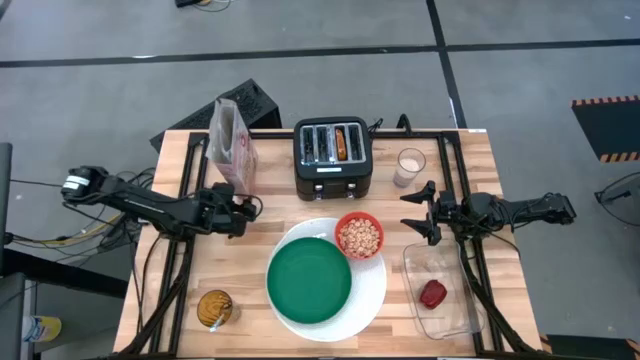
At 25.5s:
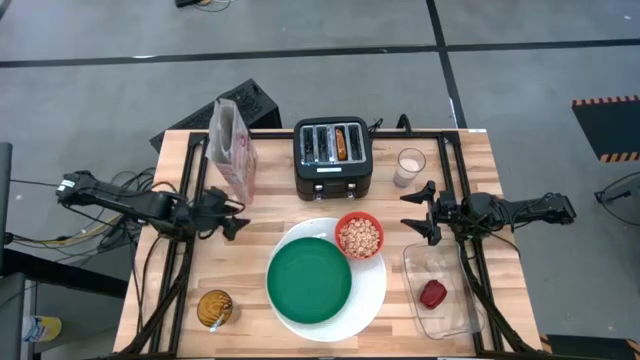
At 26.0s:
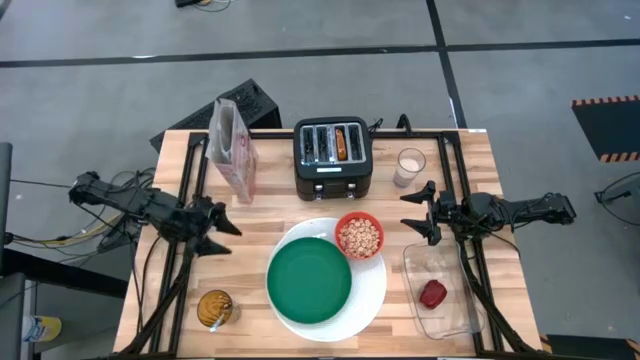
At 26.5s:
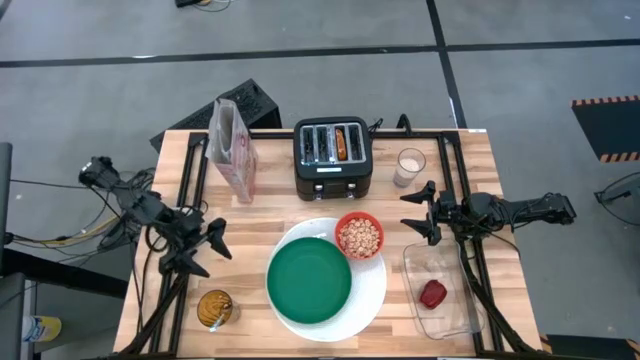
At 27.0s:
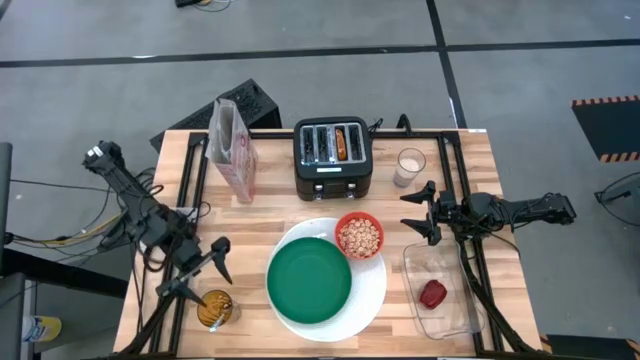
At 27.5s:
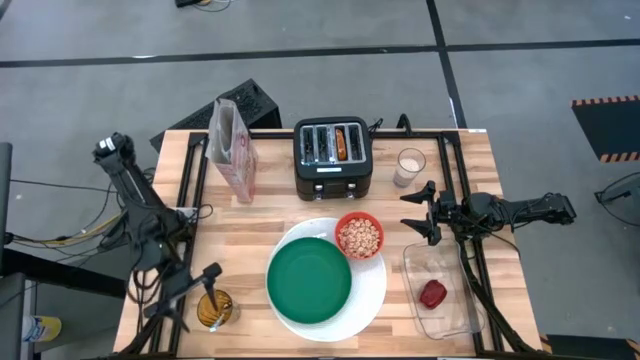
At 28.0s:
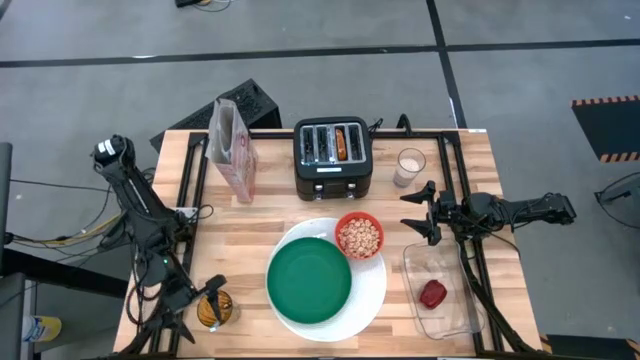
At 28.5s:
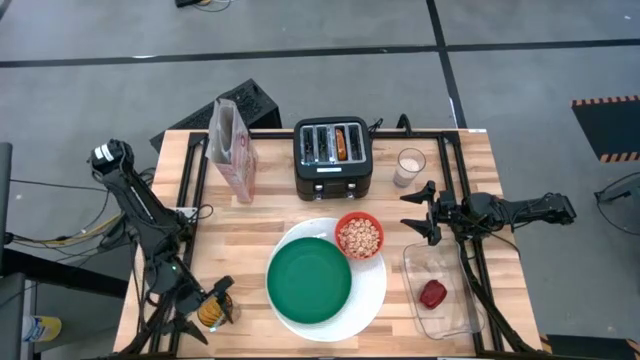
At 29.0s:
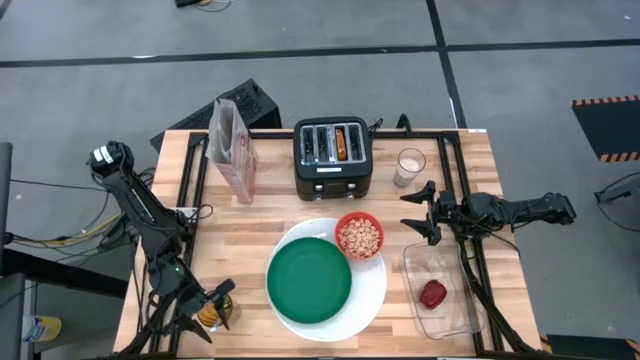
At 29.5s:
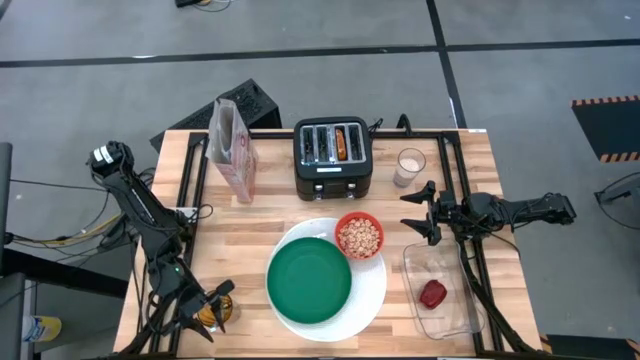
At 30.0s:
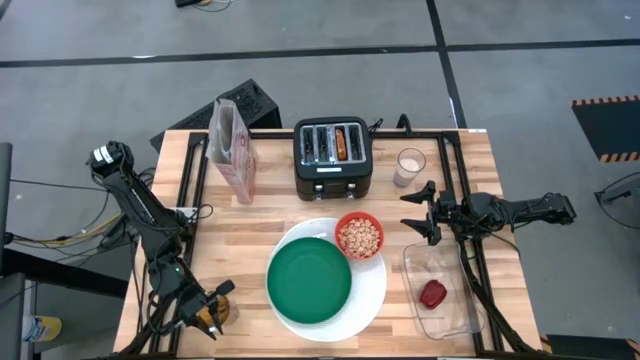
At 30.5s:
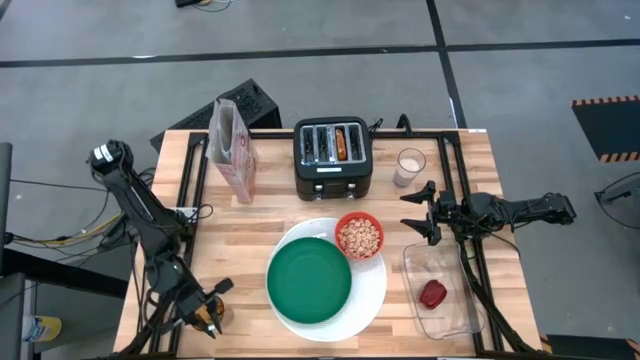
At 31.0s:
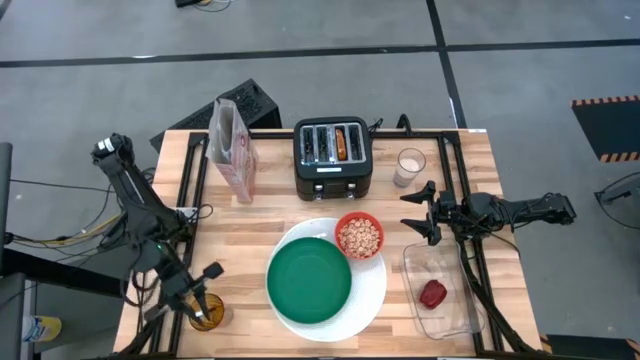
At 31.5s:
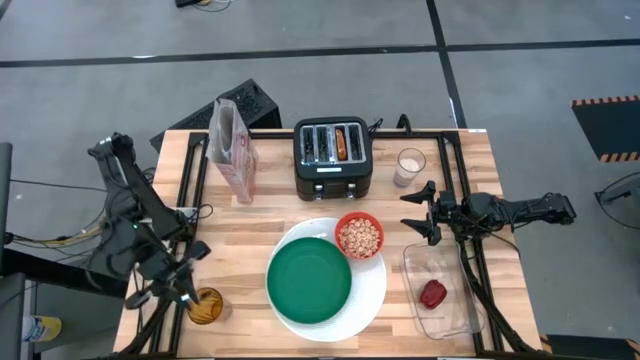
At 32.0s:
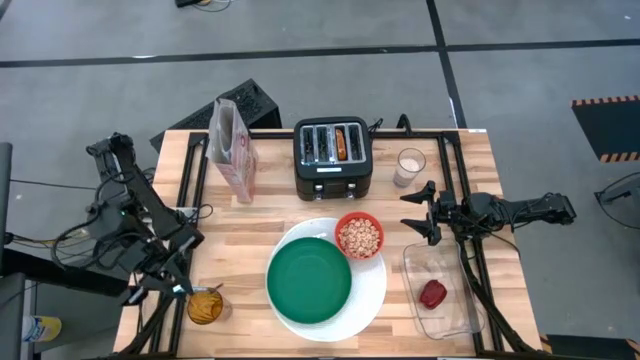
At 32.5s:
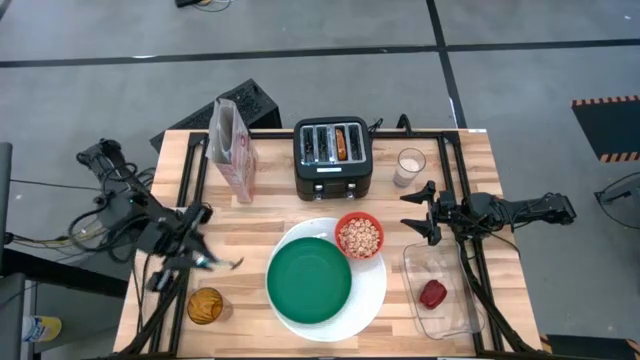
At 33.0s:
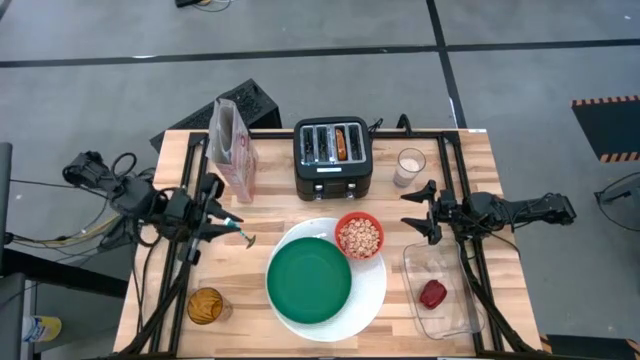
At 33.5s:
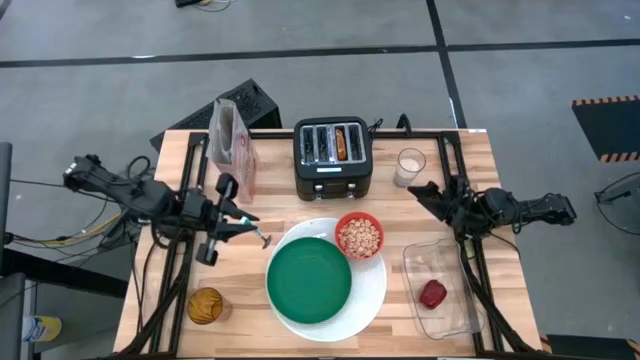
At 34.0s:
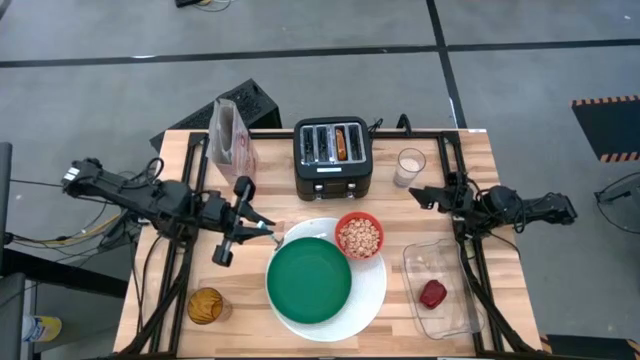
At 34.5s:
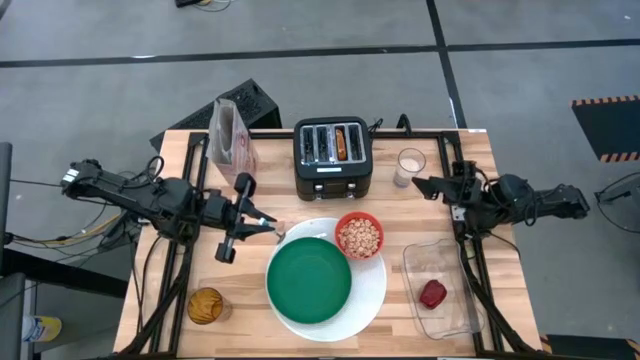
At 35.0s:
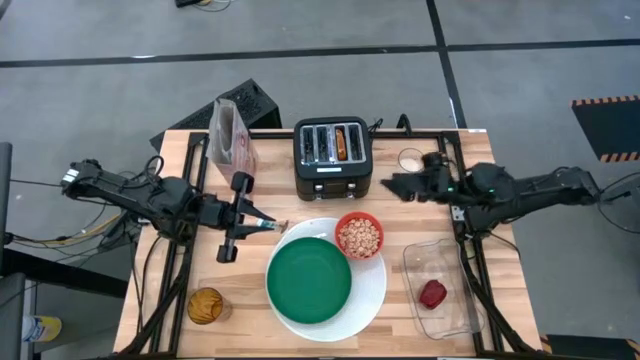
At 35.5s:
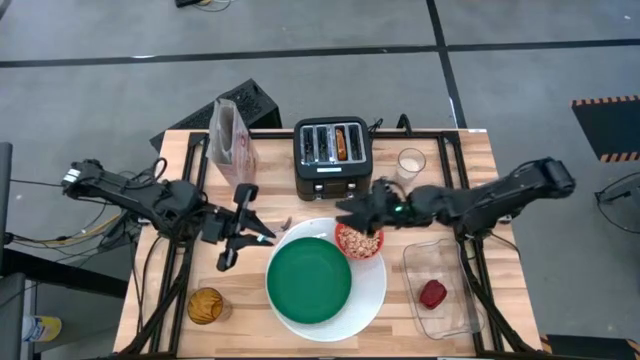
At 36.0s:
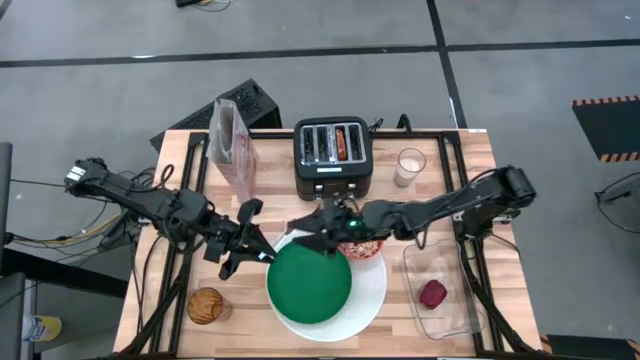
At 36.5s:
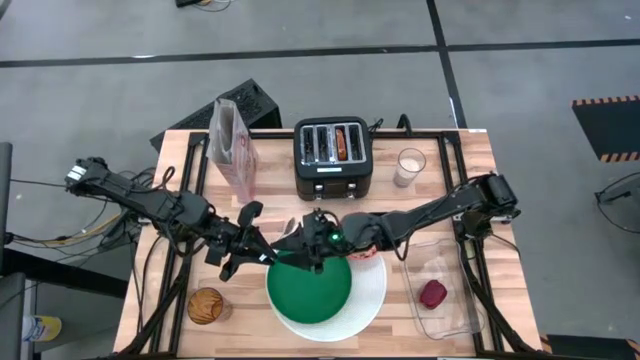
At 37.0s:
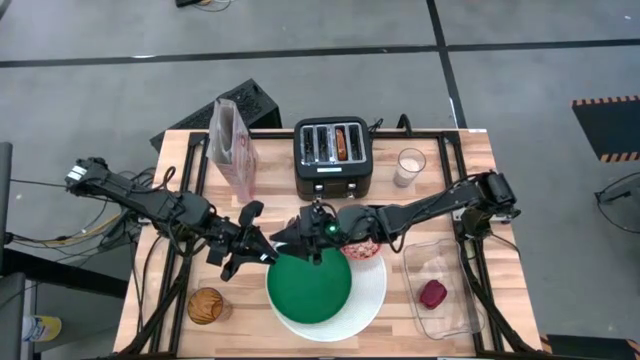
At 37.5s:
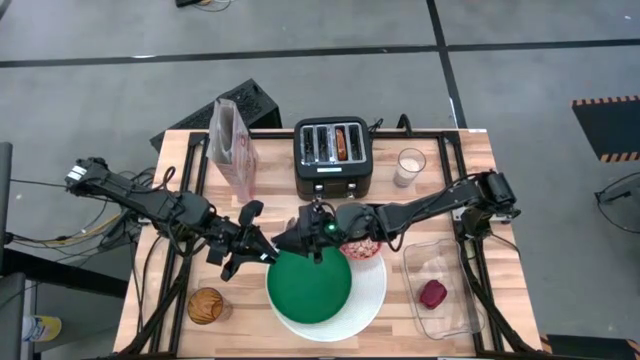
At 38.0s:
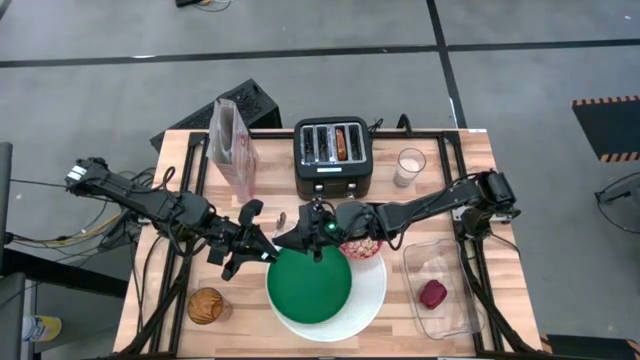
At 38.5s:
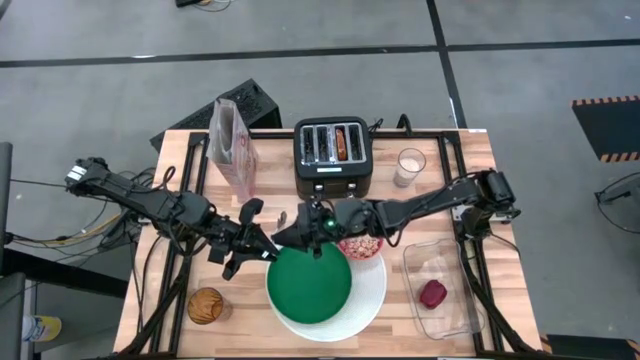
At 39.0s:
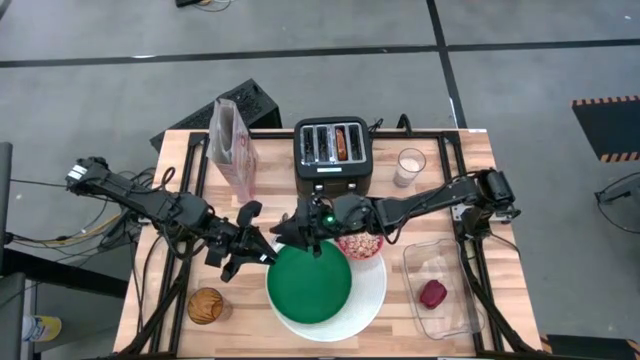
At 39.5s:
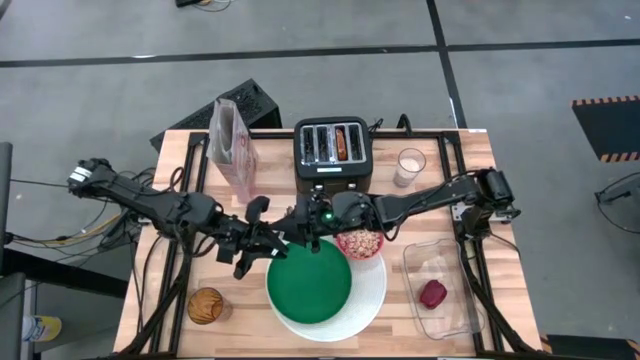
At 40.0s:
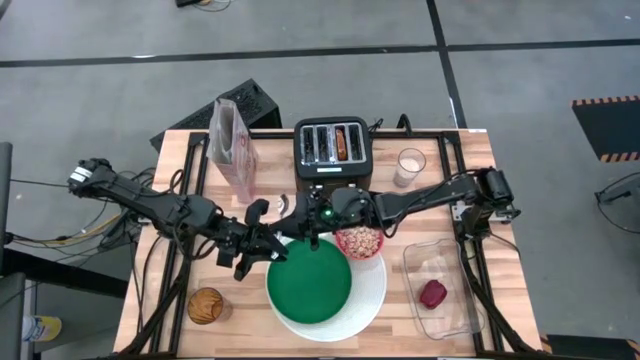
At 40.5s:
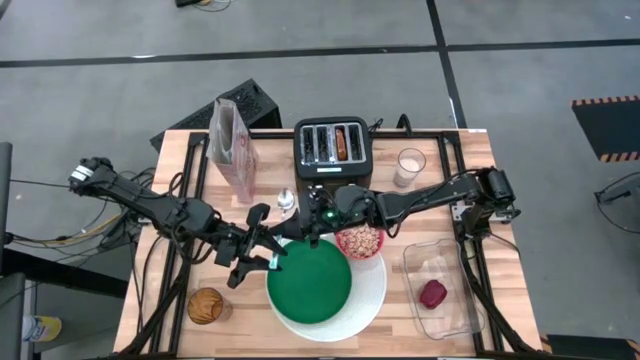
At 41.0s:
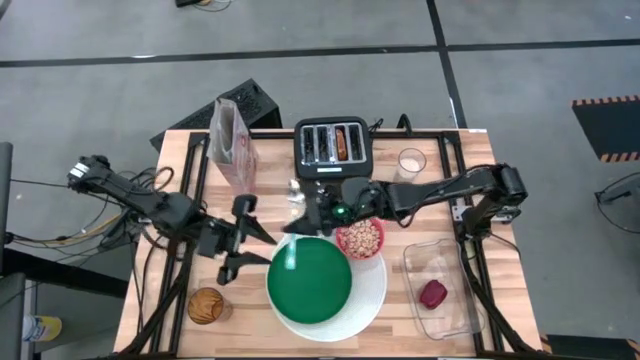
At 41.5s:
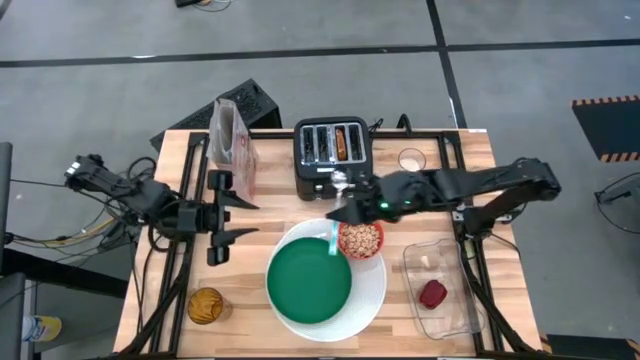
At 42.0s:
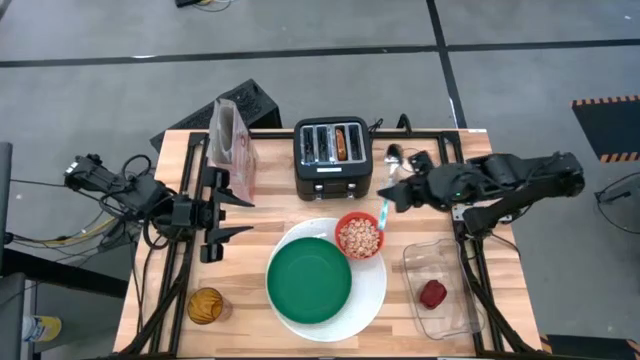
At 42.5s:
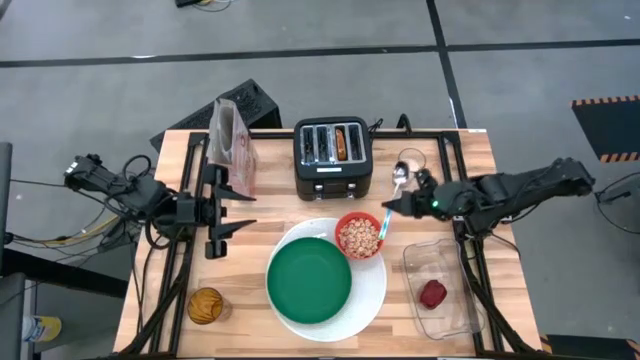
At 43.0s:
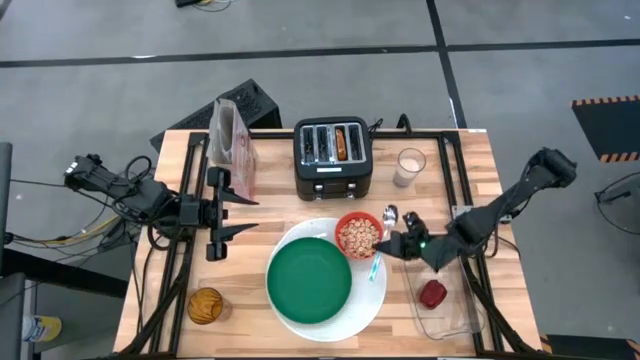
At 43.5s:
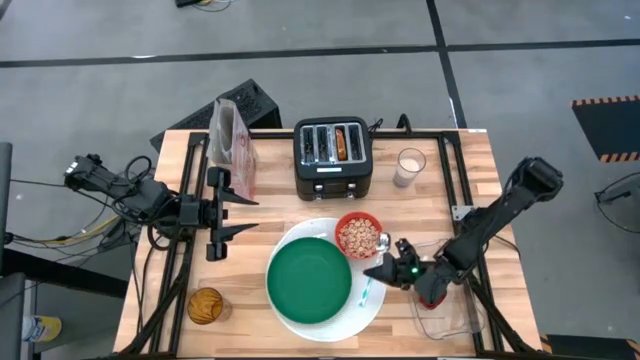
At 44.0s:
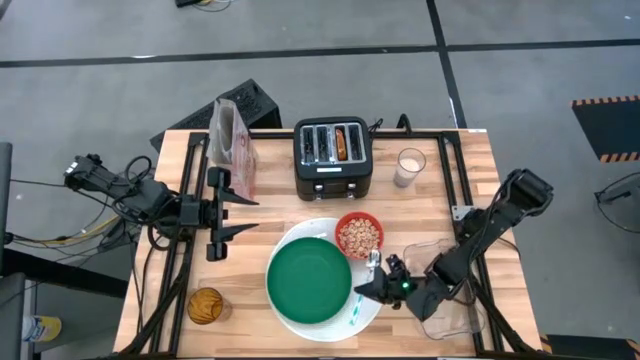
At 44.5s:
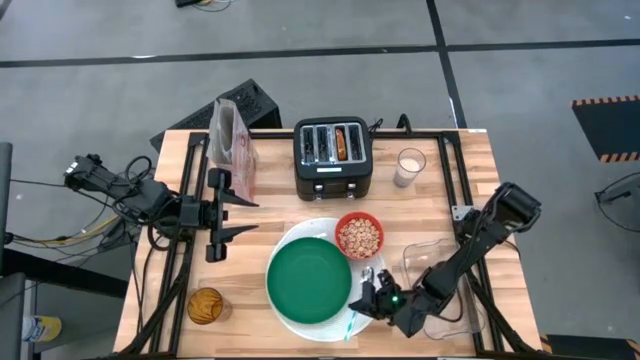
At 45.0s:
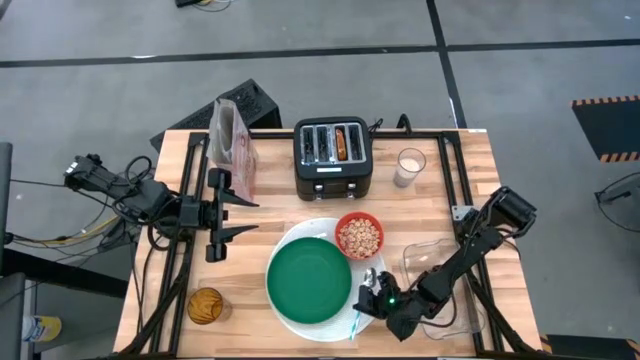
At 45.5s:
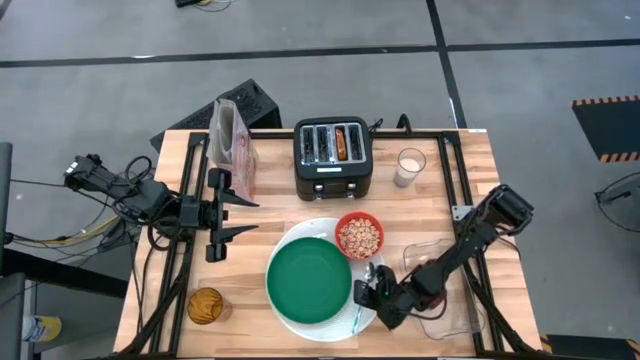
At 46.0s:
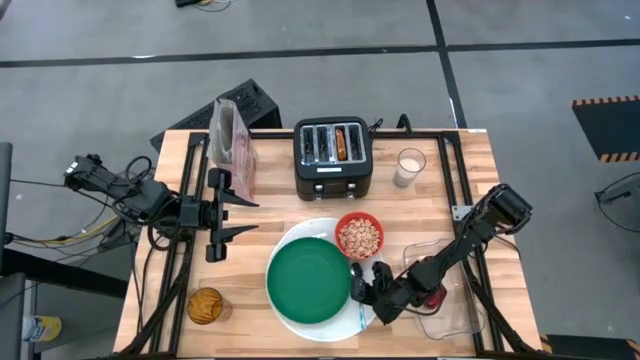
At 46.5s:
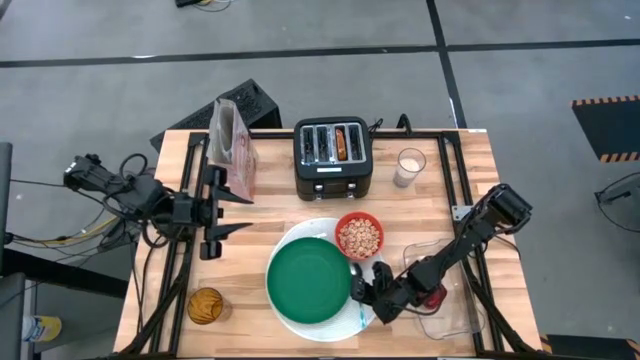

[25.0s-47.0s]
Task: Arrange a breakfast setting
Put the spoon on the placemat to the right of the plate
